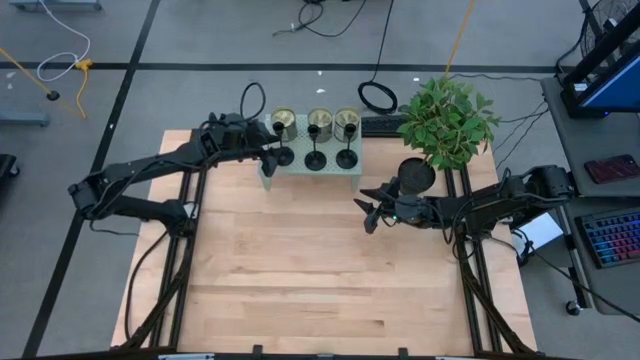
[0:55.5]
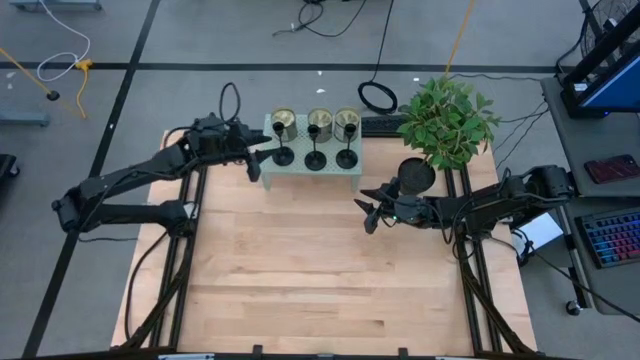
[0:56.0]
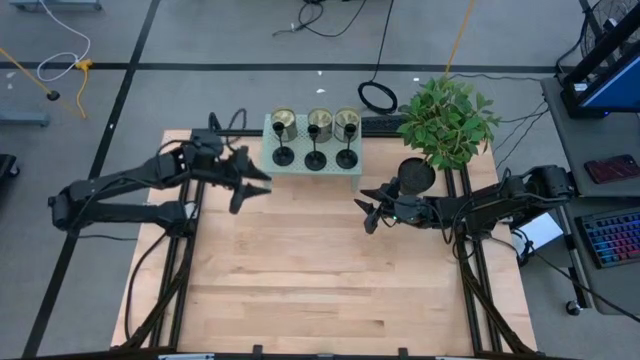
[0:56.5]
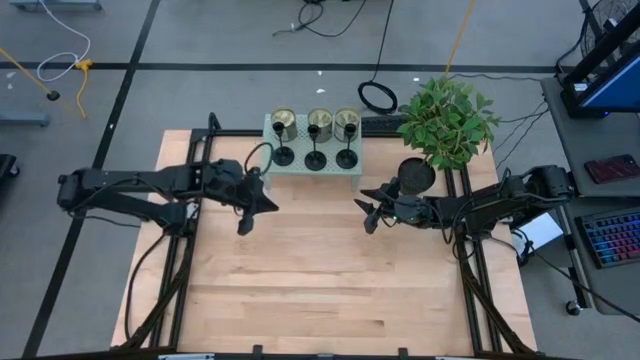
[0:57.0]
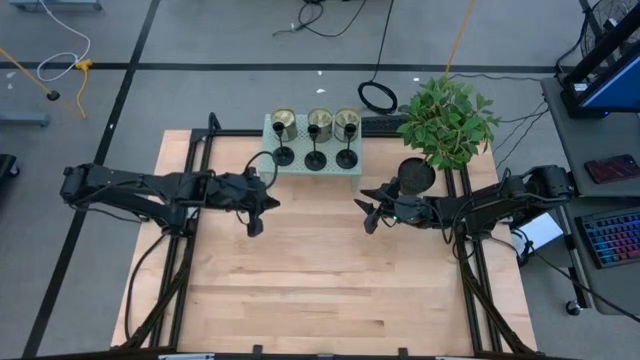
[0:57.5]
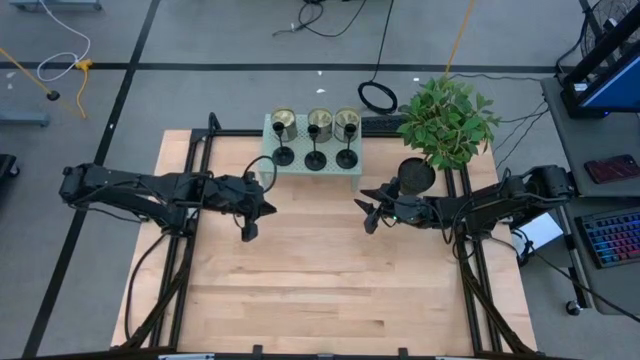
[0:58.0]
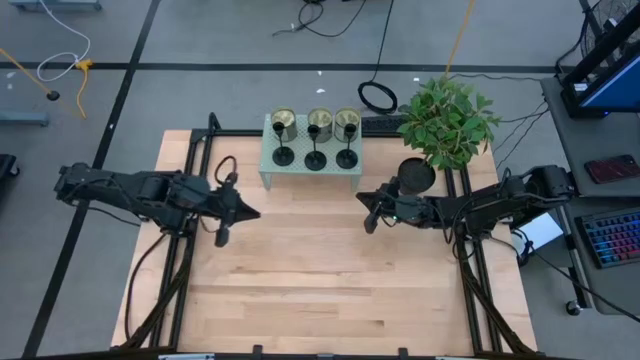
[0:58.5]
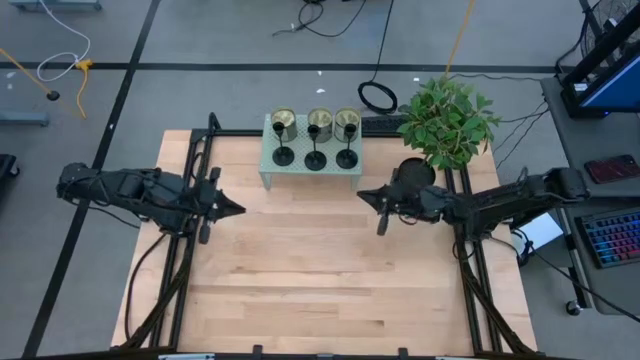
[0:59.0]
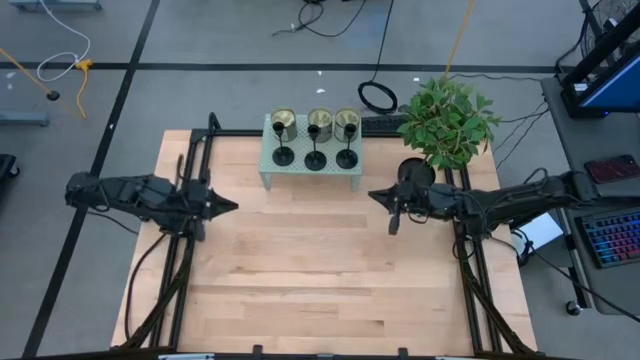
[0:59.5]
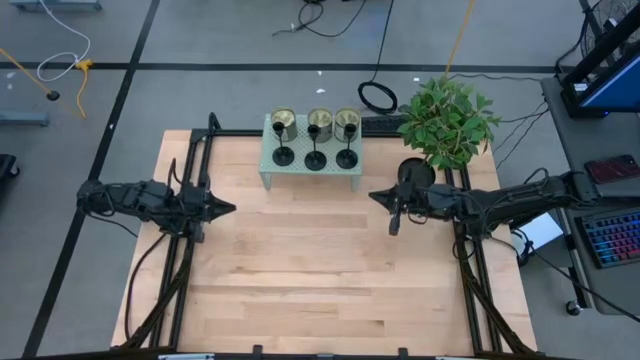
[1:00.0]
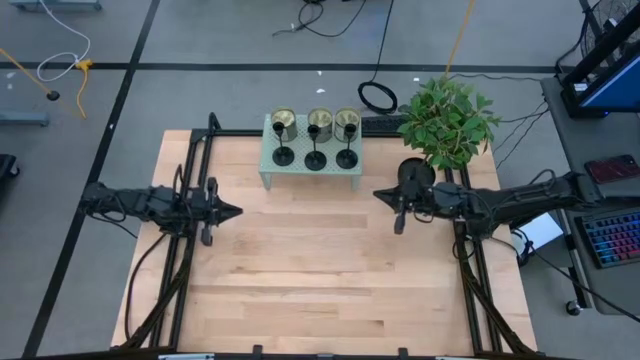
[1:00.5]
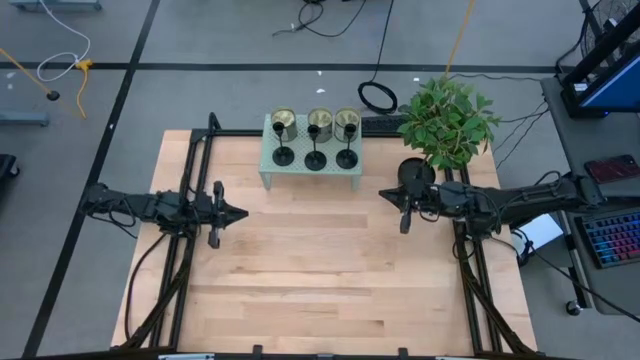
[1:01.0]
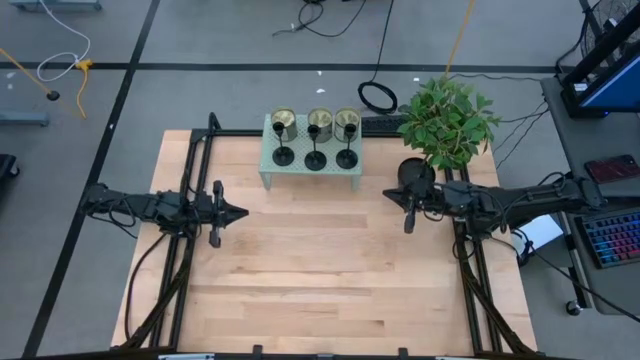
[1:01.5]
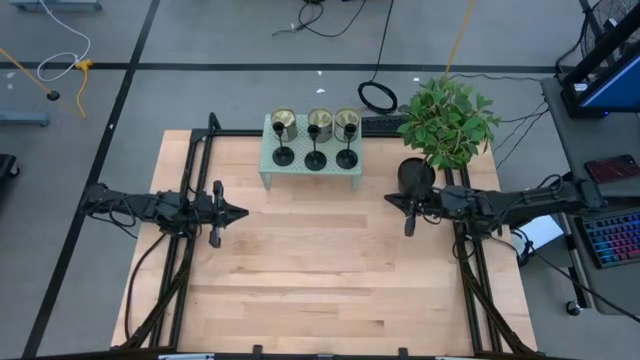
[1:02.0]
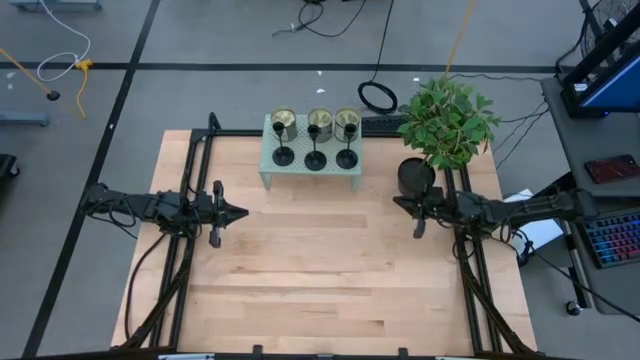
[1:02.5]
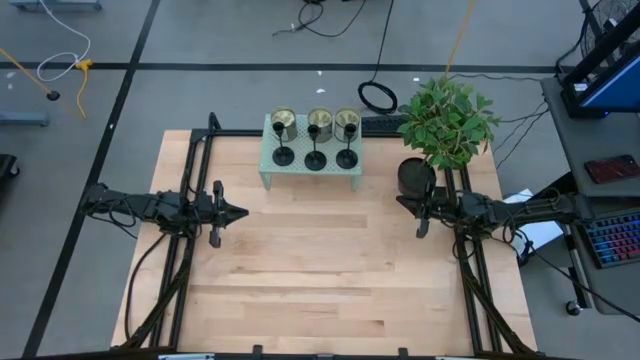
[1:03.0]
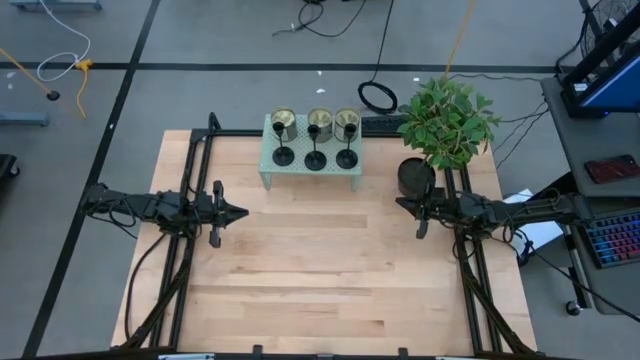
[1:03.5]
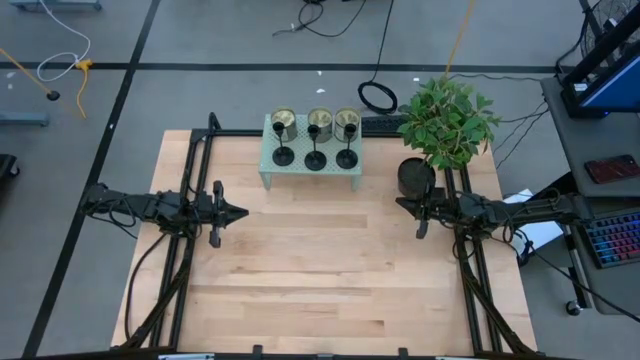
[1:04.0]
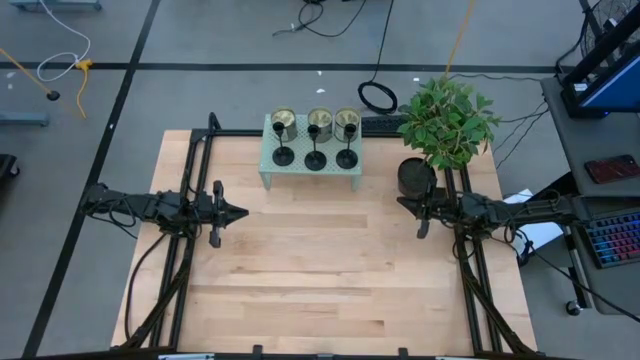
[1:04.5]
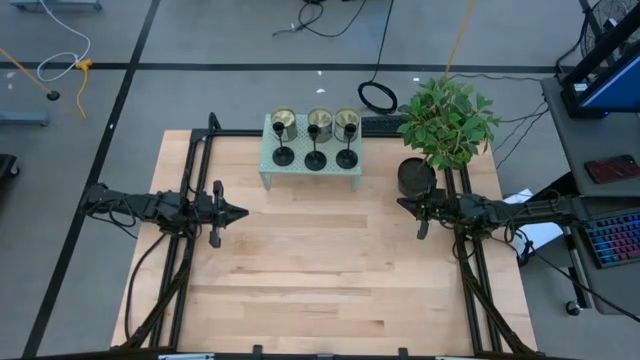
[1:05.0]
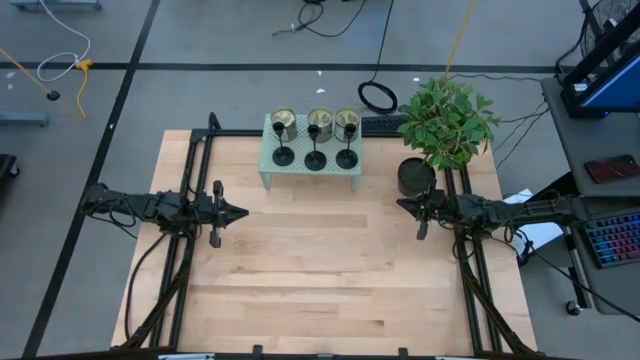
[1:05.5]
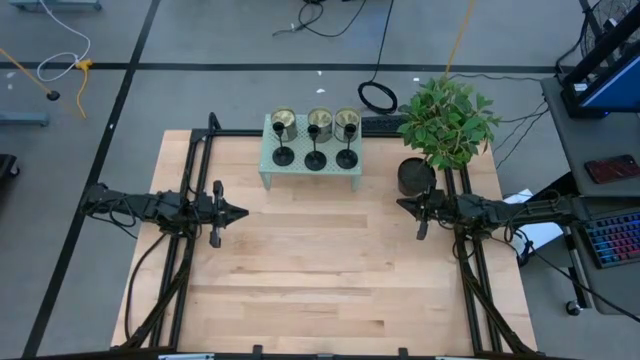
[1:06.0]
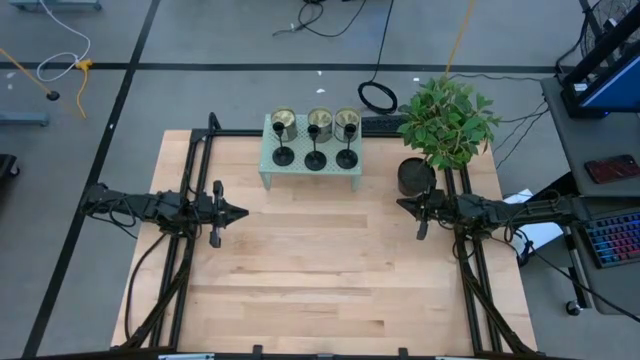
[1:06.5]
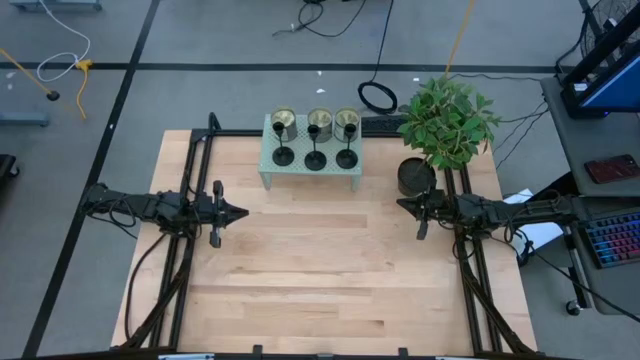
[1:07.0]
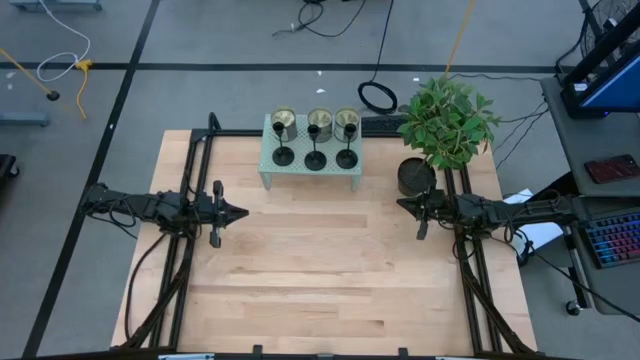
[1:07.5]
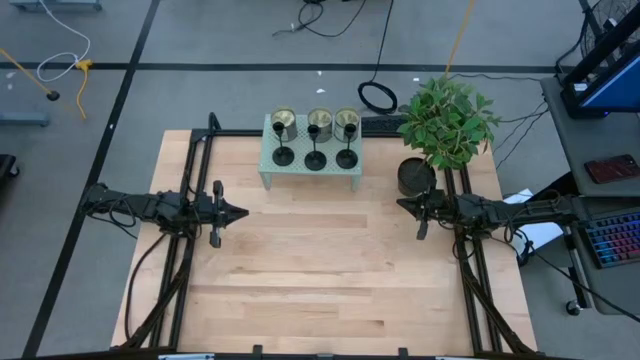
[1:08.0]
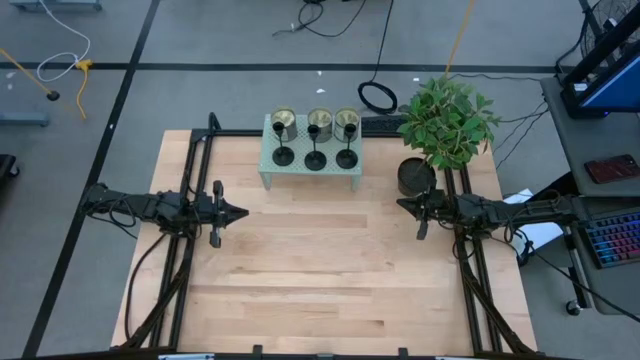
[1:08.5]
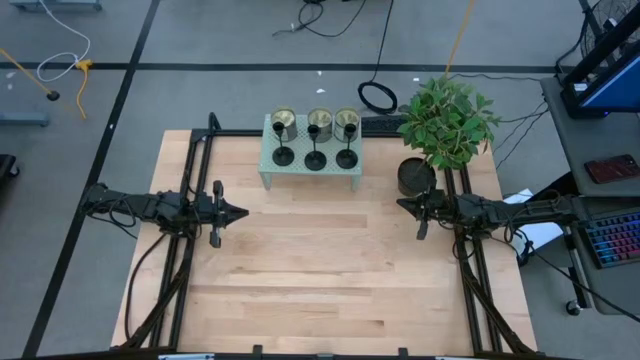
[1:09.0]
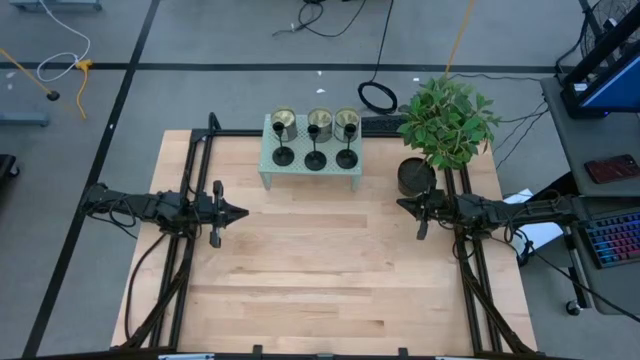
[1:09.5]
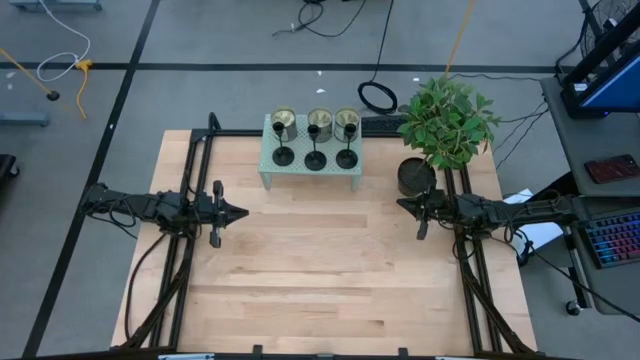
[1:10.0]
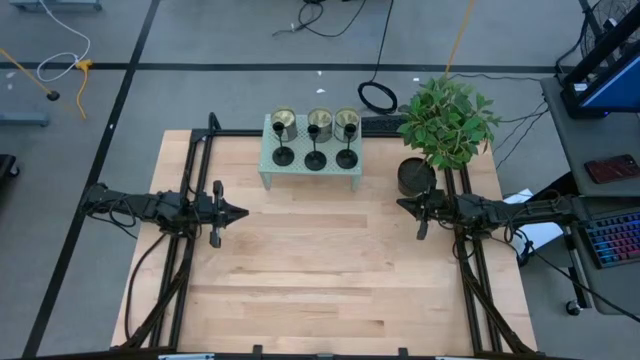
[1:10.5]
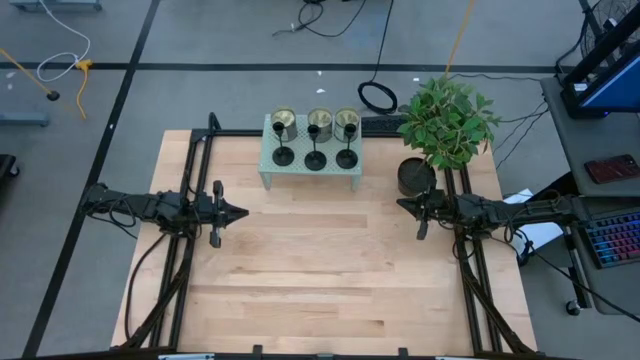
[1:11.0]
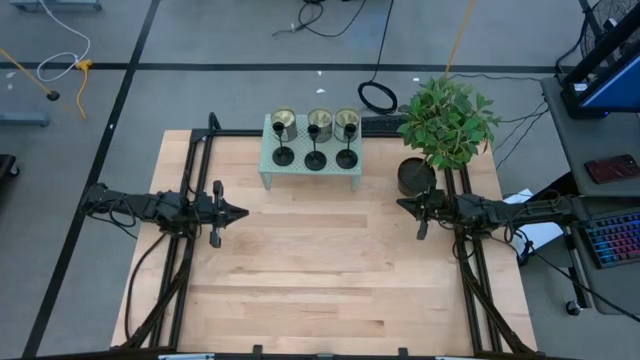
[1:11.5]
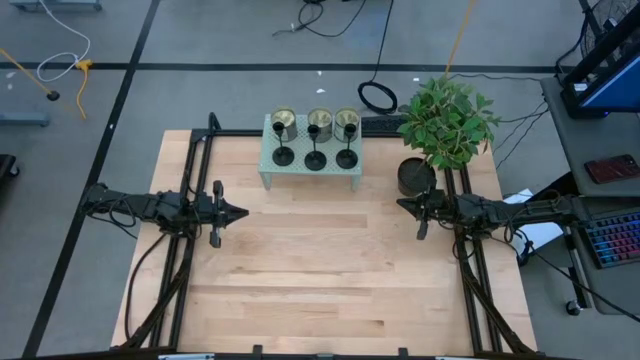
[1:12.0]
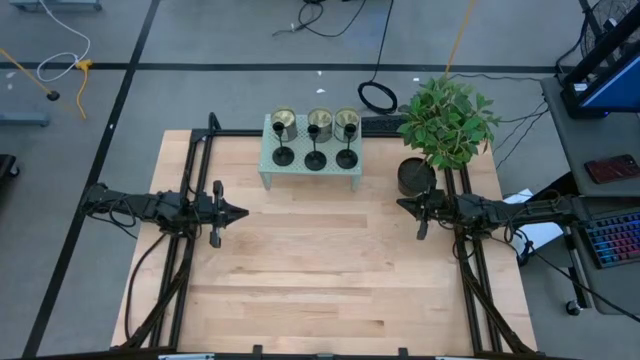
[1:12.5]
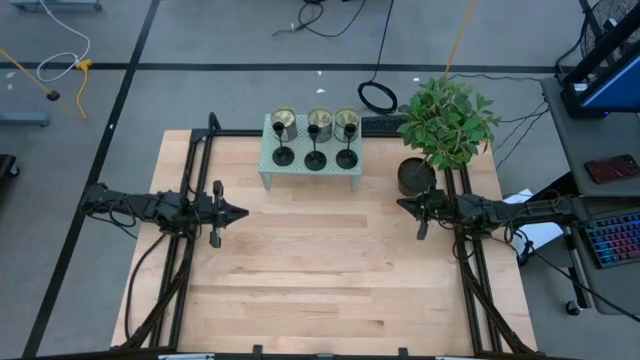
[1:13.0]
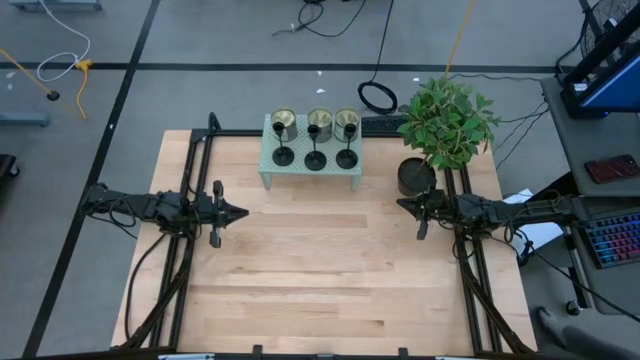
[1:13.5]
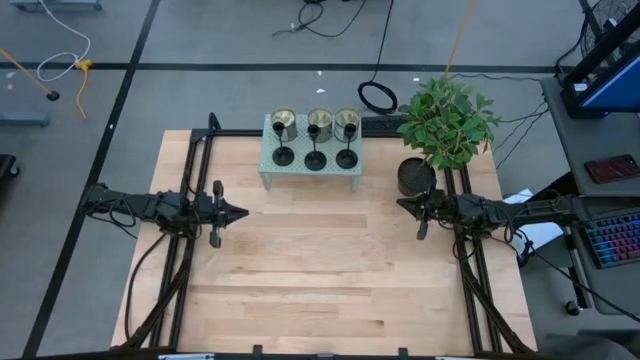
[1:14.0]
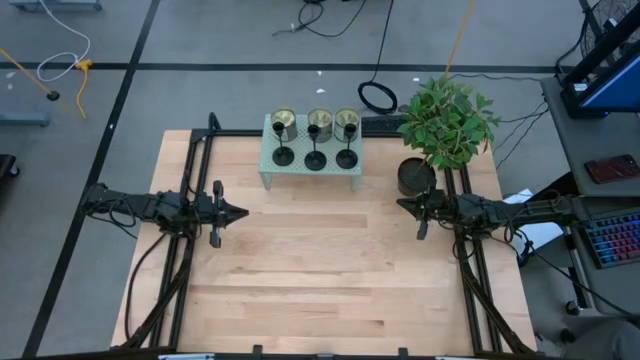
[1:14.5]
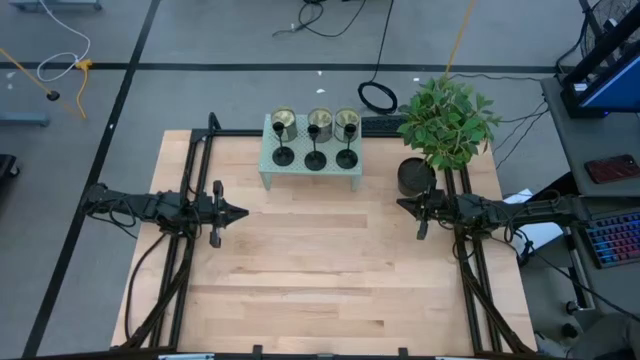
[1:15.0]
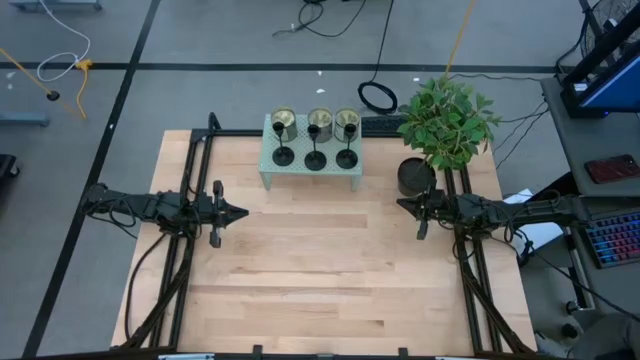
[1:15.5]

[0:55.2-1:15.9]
Task: Pick & Place candle stick holders
Return to Home Position
